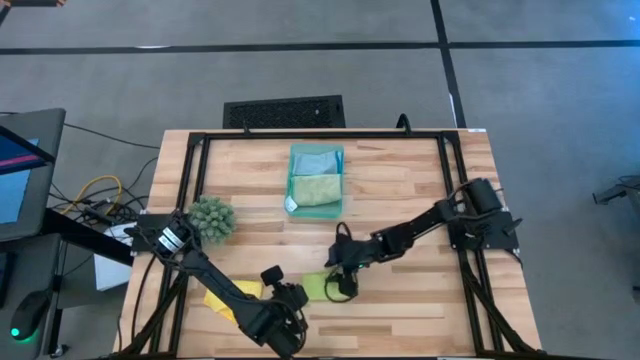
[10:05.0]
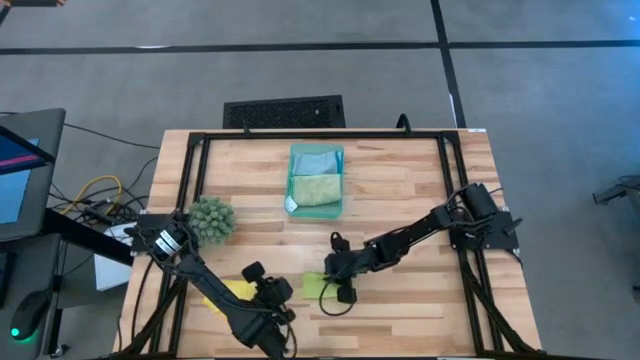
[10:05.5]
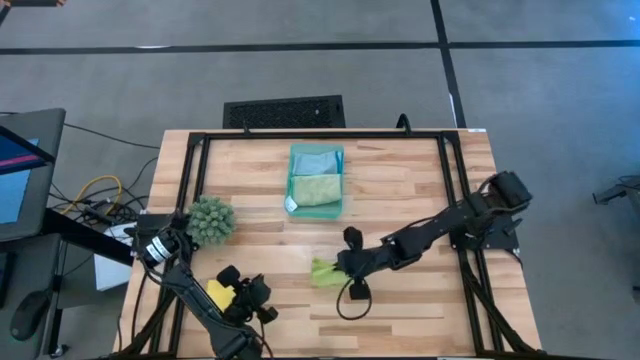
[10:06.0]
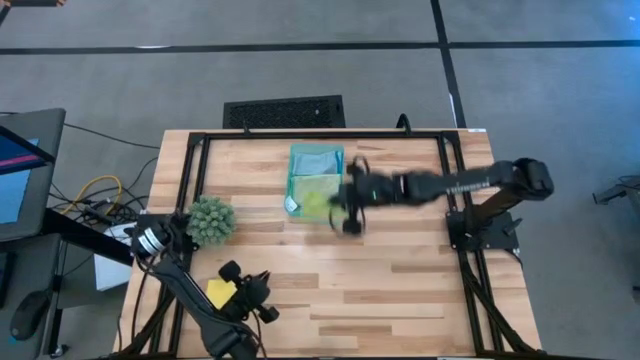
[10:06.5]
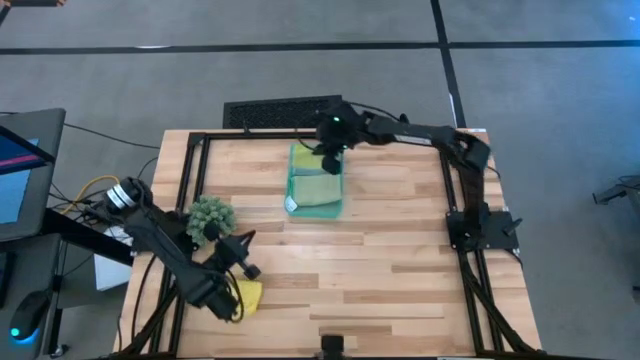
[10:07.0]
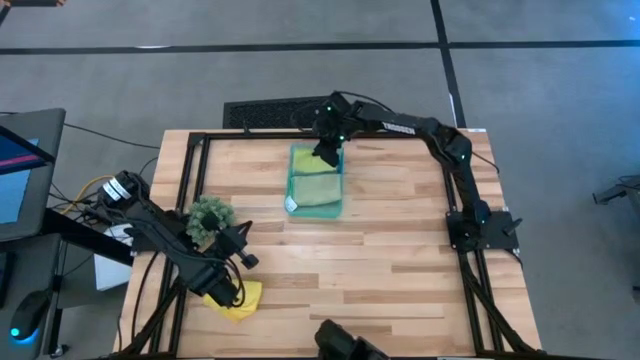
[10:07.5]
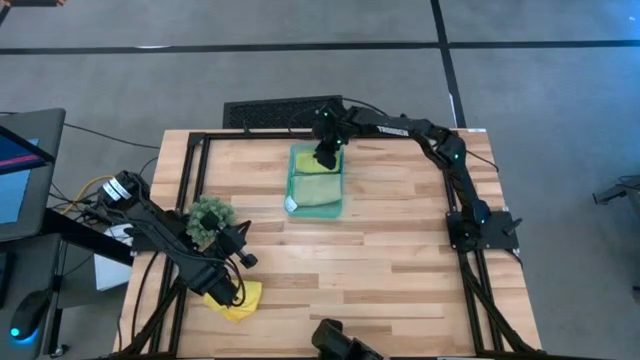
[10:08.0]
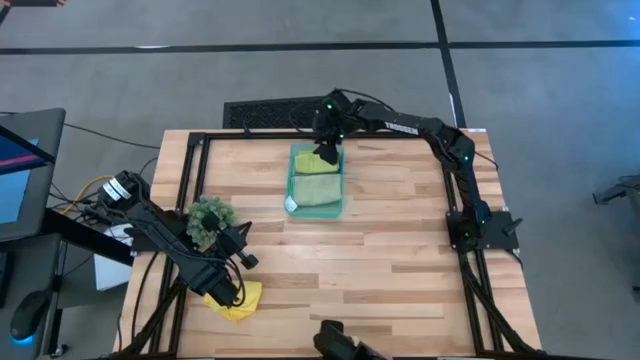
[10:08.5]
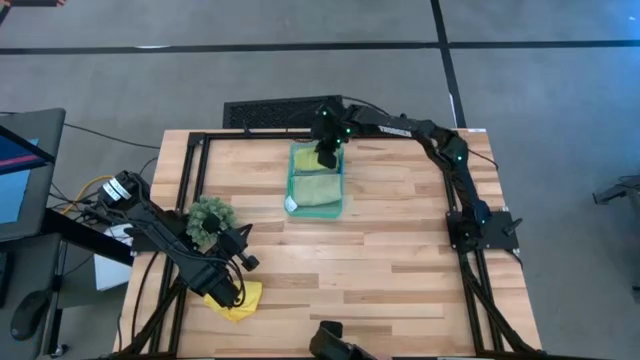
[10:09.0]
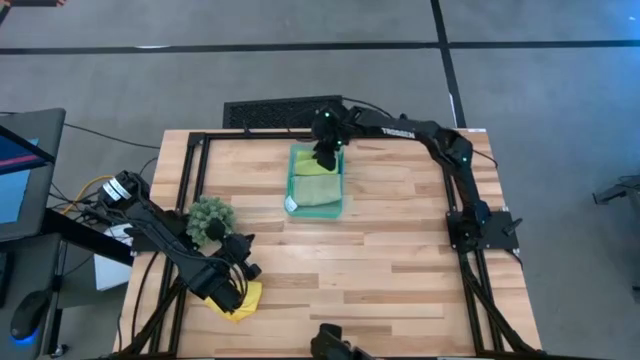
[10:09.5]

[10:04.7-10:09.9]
Task: Fold microfiber towels
Stack the folded light green microfiber cloth on top of the folded blue microfiber cloth in the green bin

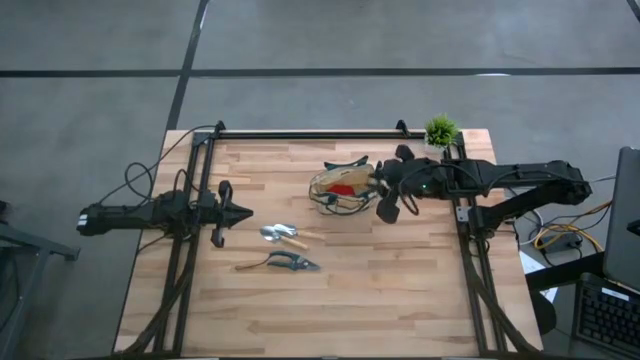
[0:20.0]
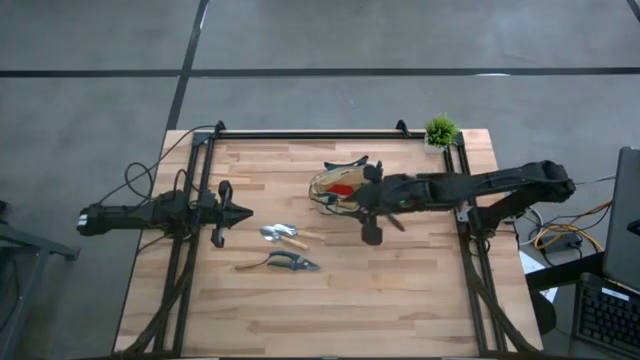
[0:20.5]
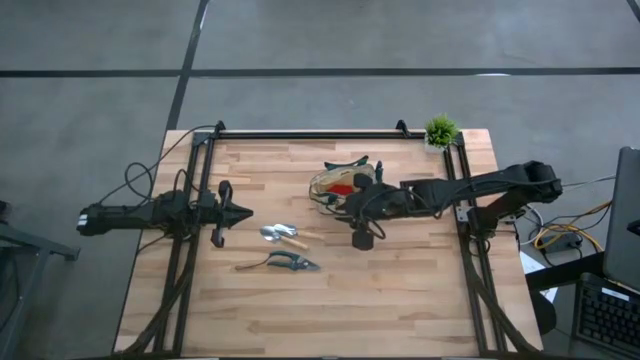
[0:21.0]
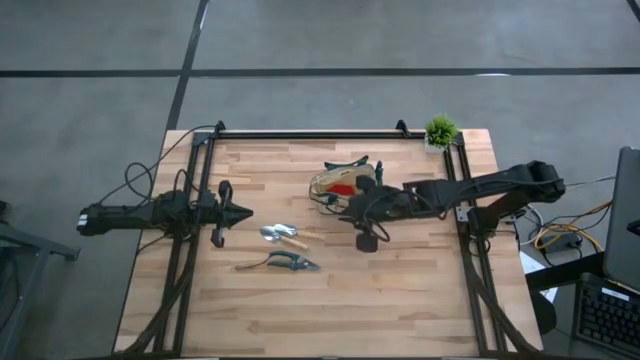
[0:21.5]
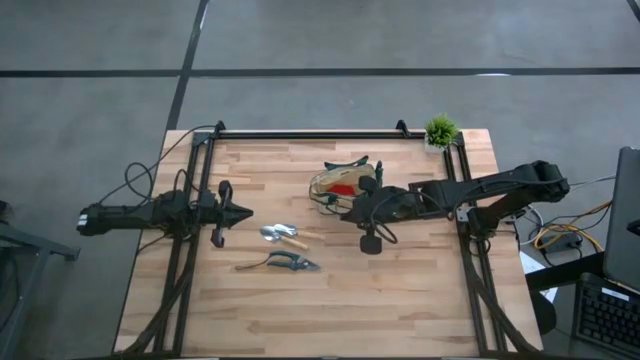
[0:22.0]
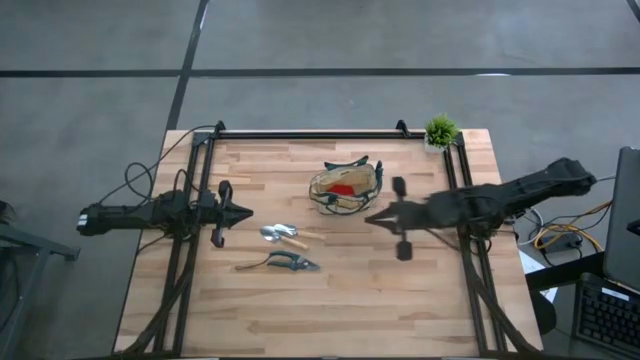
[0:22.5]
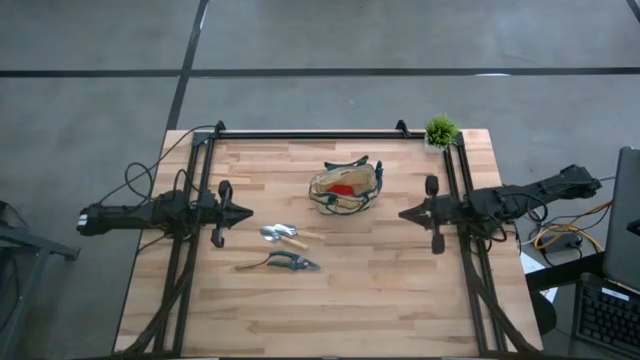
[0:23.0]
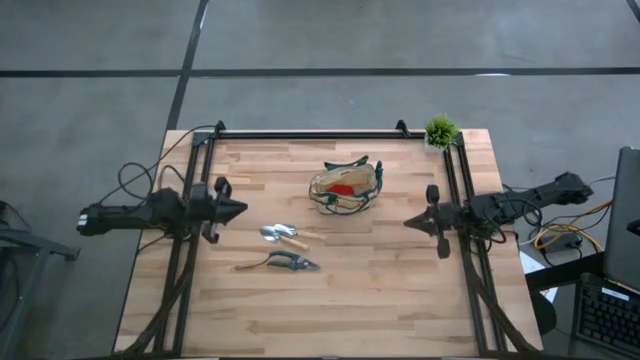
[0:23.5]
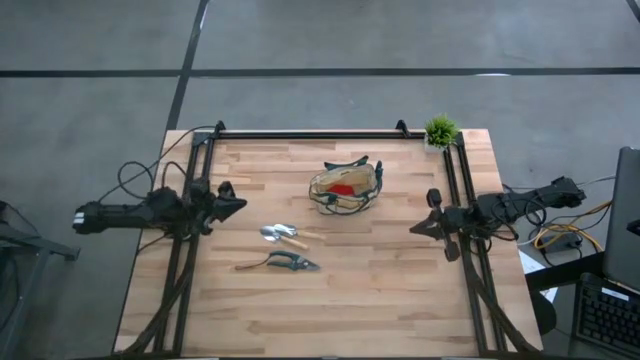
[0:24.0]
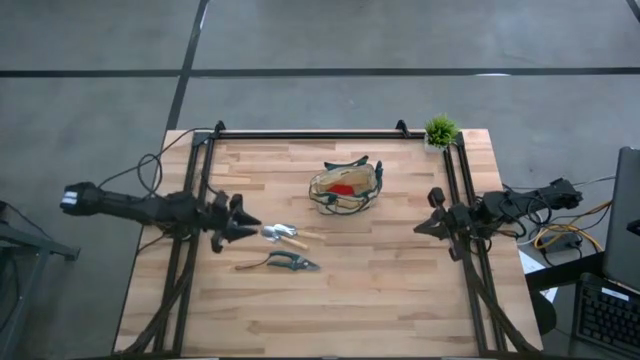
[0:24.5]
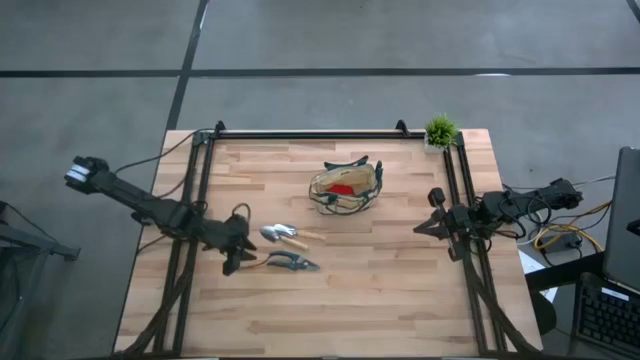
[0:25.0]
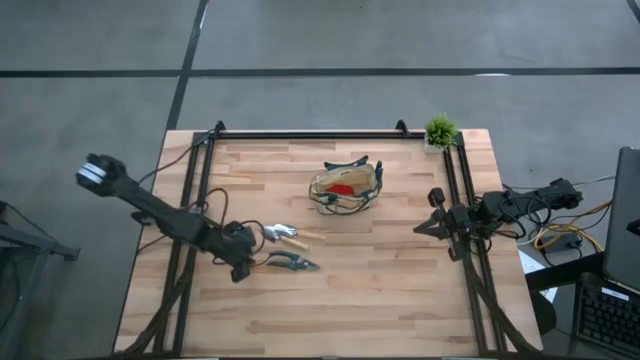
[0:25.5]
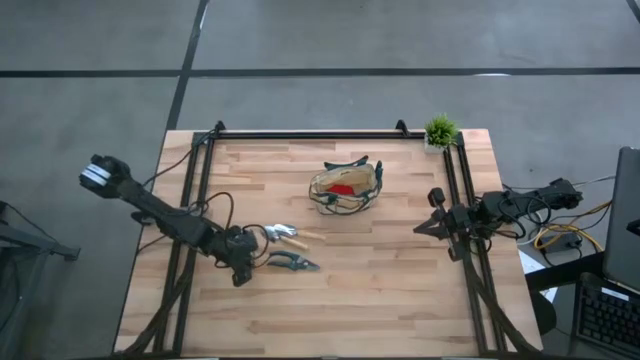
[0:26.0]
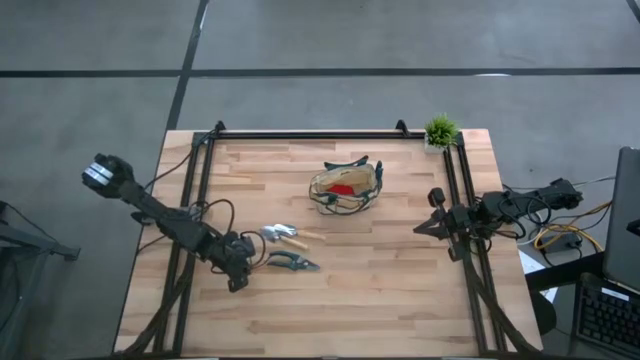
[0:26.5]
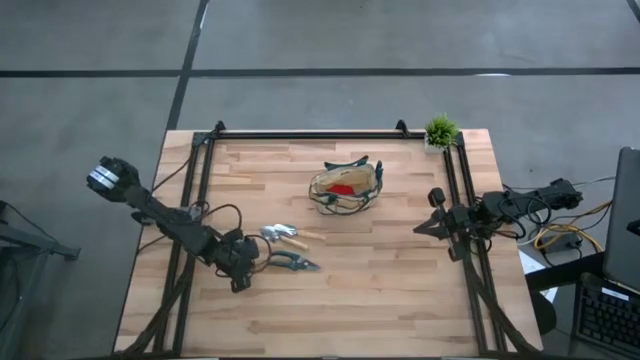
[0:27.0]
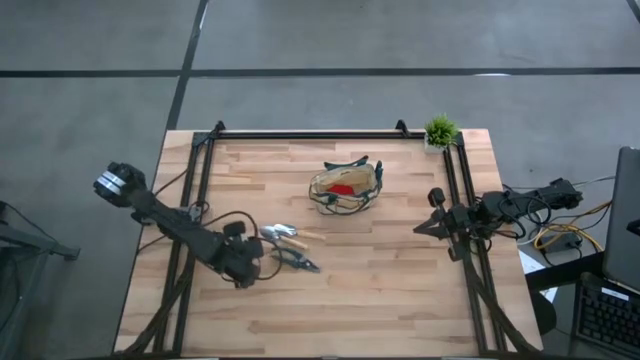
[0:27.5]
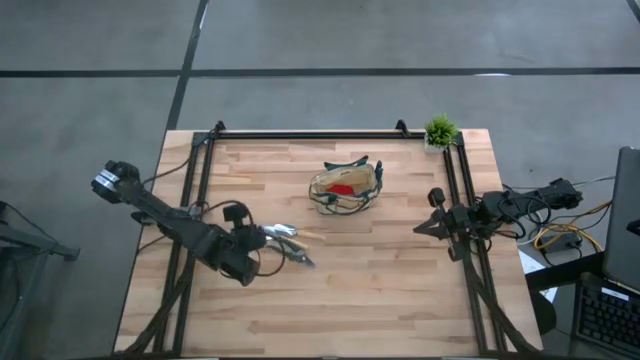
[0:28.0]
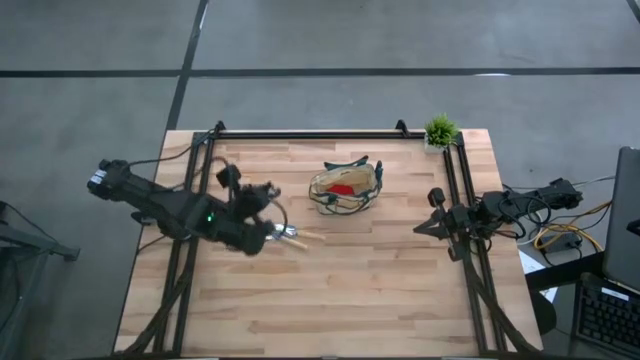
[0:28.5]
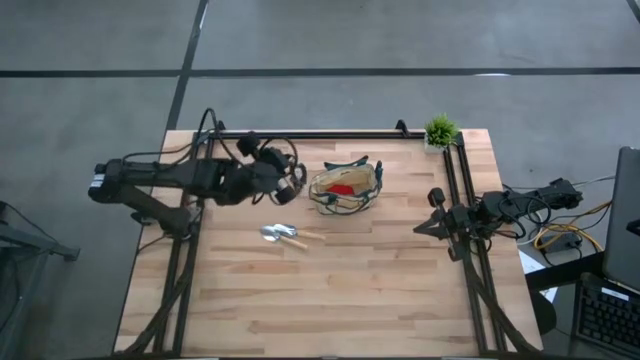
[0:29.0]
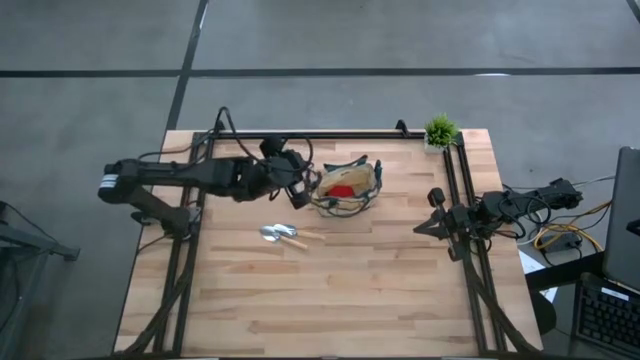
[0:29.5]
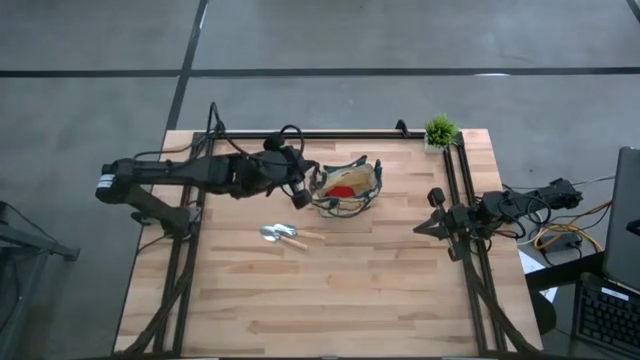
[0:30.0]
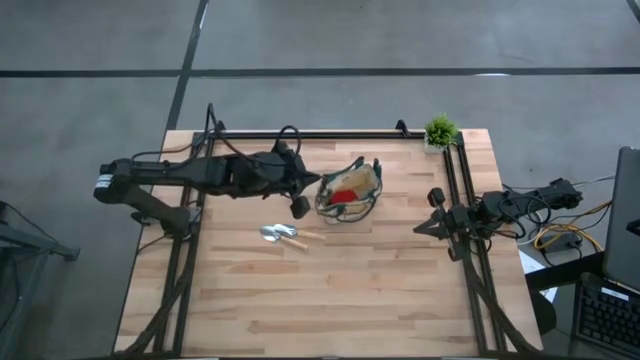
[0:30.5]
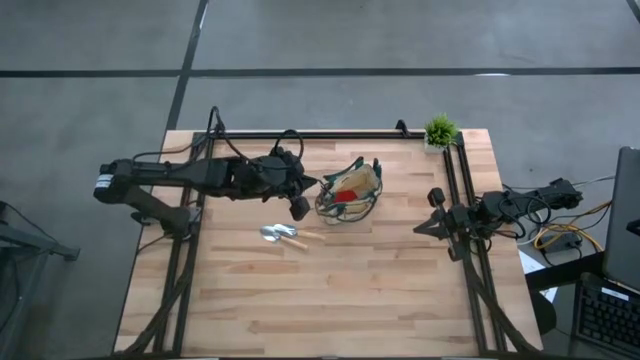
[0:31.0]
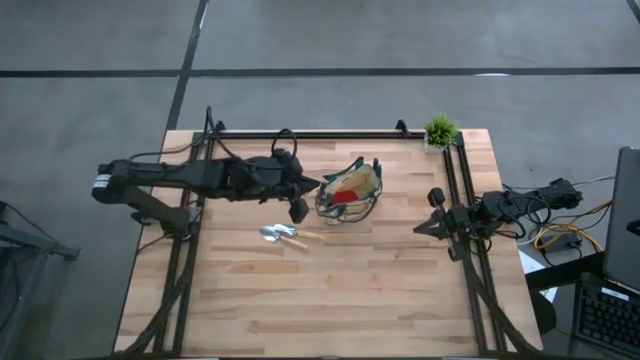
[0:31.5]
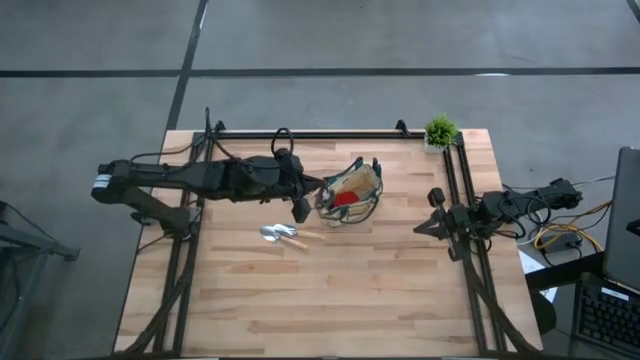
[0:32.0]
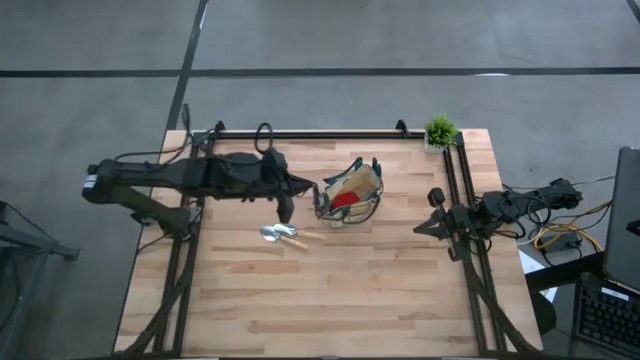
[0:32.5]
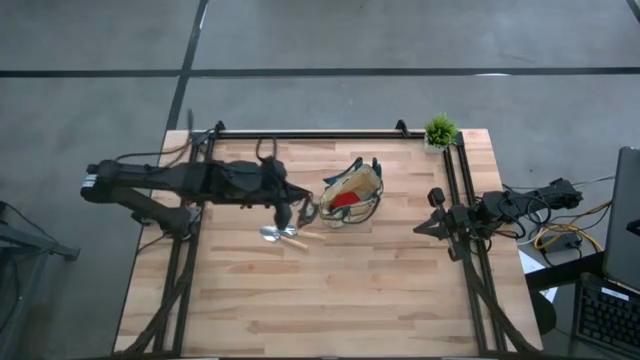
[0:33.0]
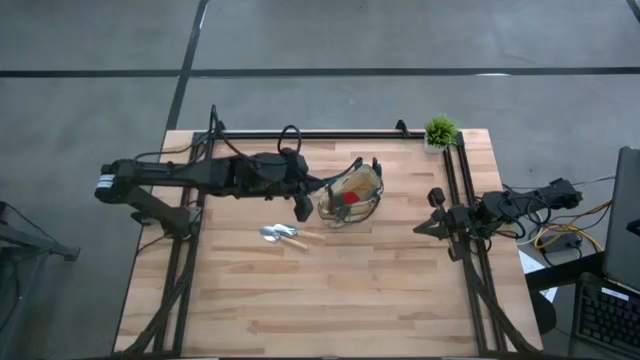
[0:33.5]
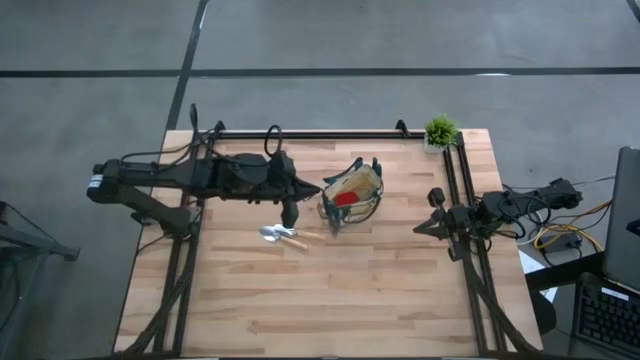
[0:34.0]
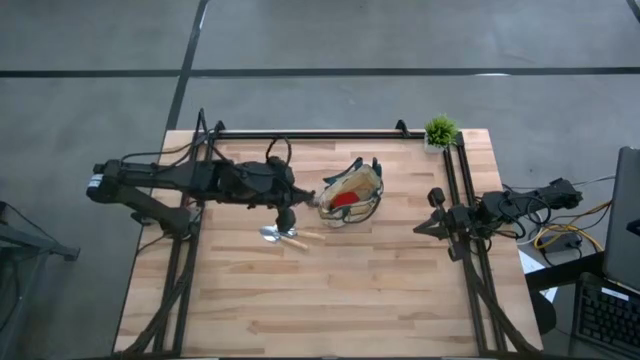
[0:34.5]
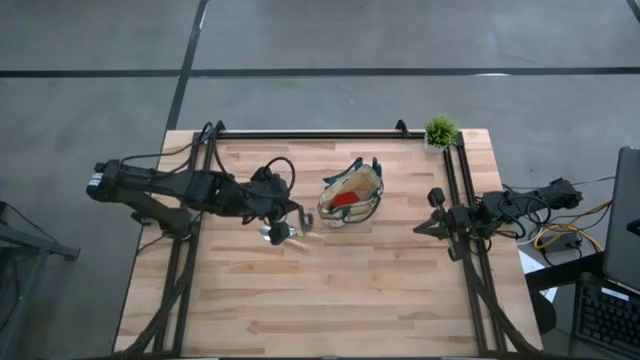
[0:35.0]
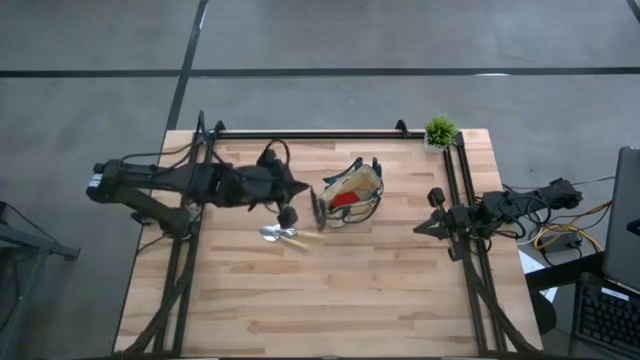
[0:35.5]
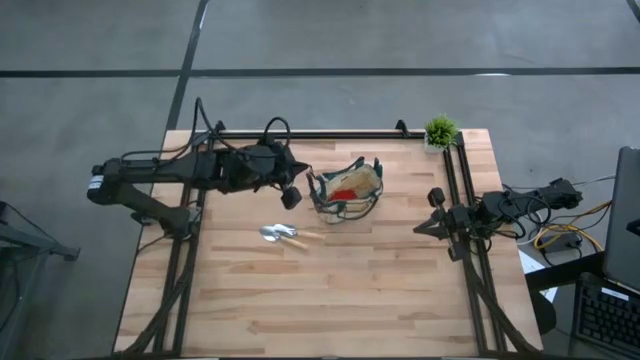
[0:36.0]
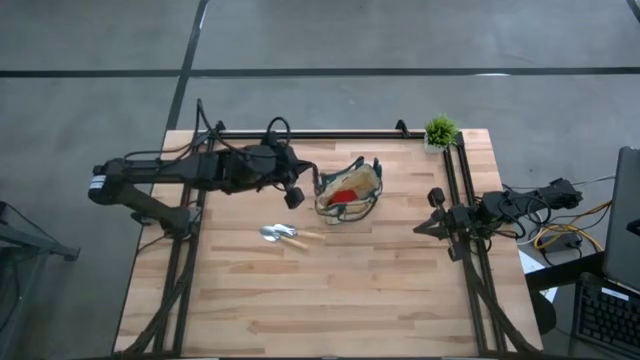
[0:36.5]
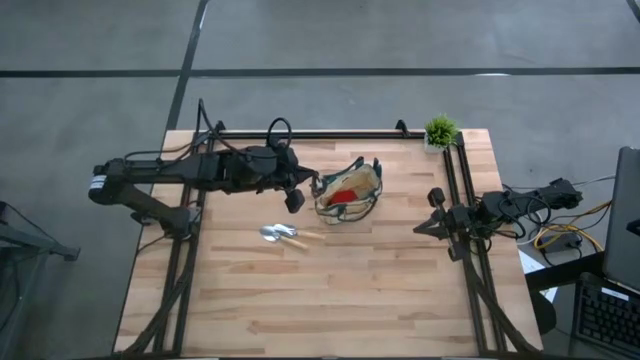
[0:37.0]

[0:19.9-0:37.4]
Task: Pick & Place Garden tools in Gardening bag
Put the green scissors into the brown bag
